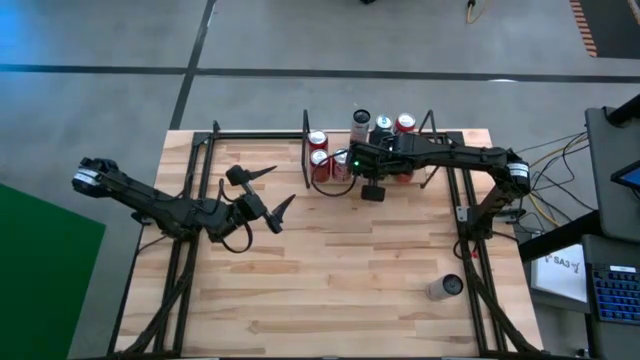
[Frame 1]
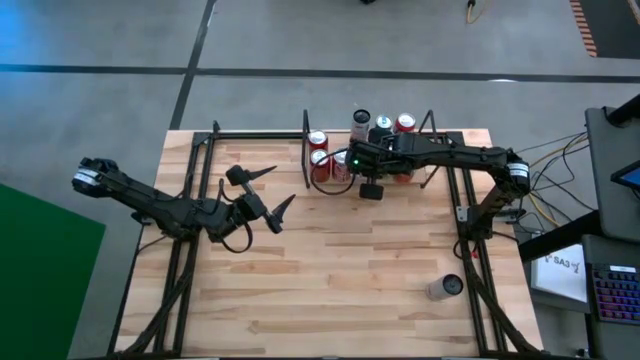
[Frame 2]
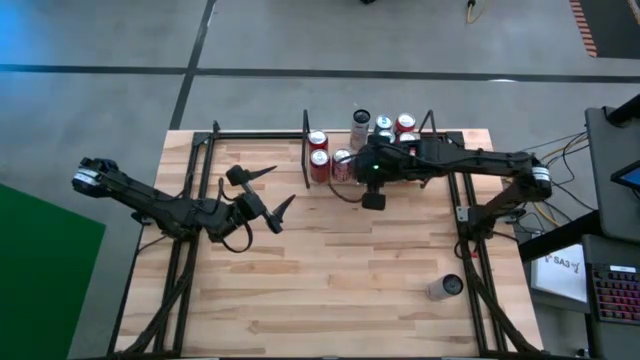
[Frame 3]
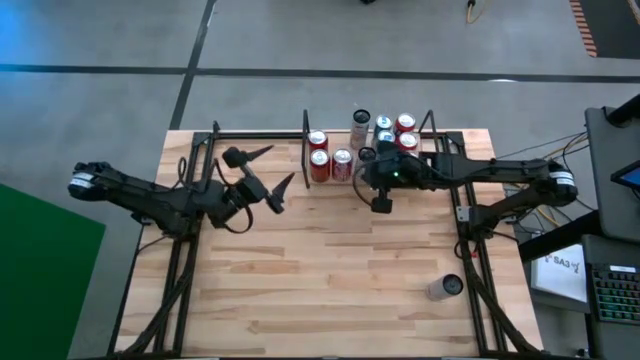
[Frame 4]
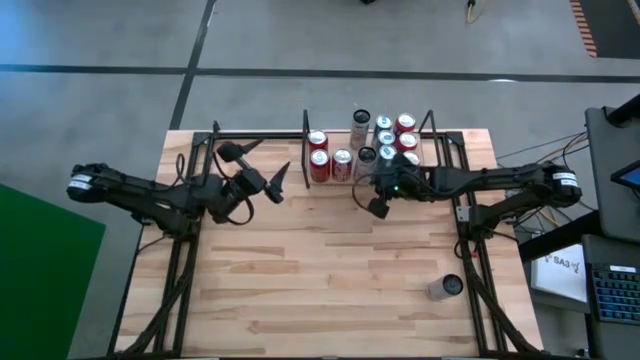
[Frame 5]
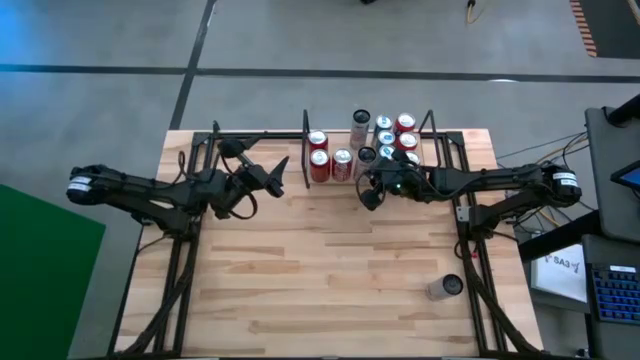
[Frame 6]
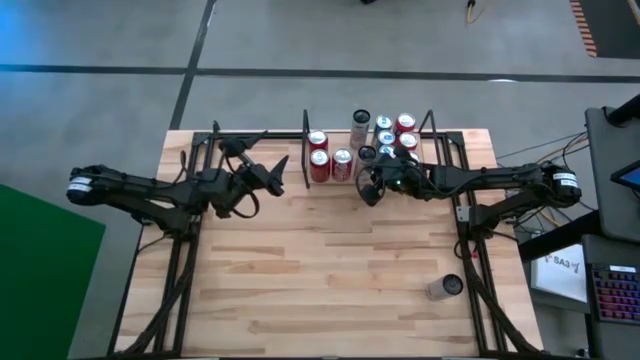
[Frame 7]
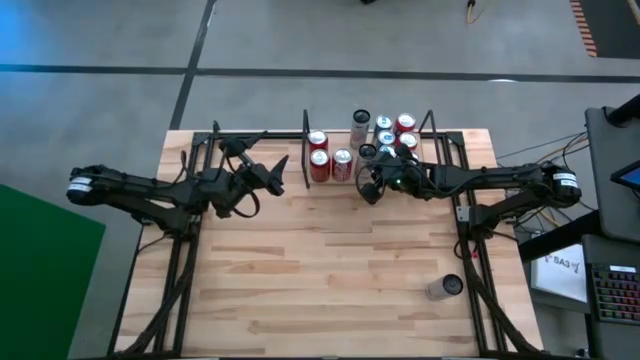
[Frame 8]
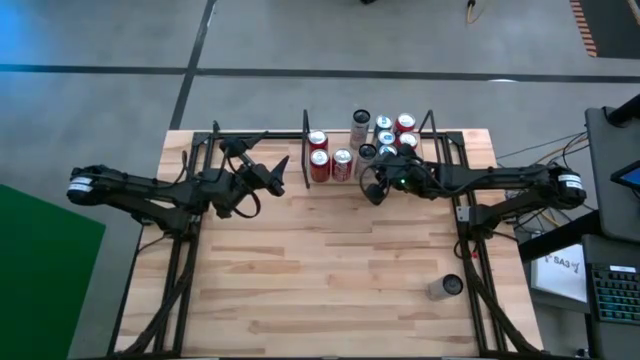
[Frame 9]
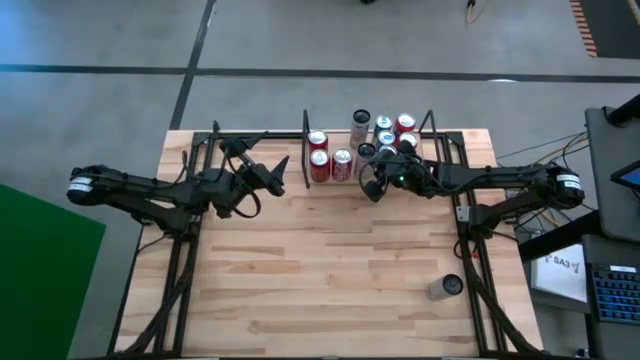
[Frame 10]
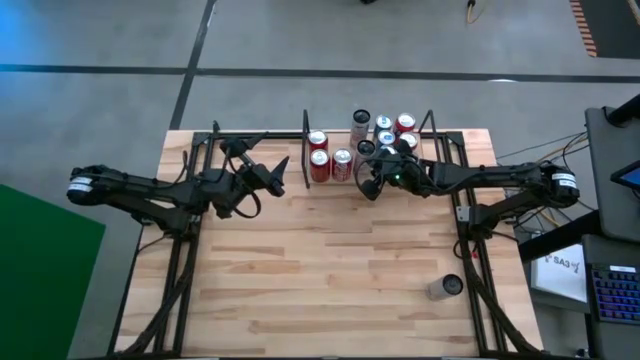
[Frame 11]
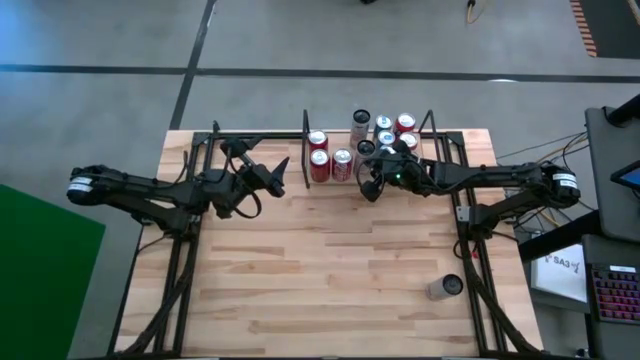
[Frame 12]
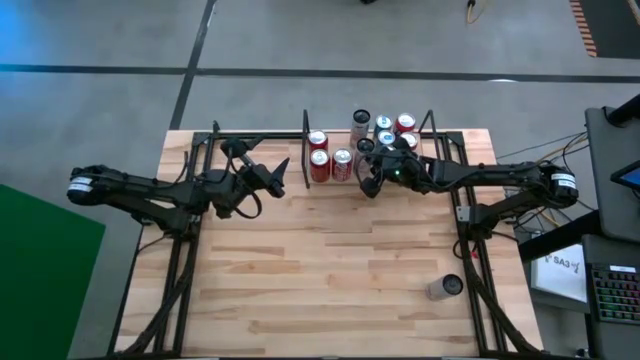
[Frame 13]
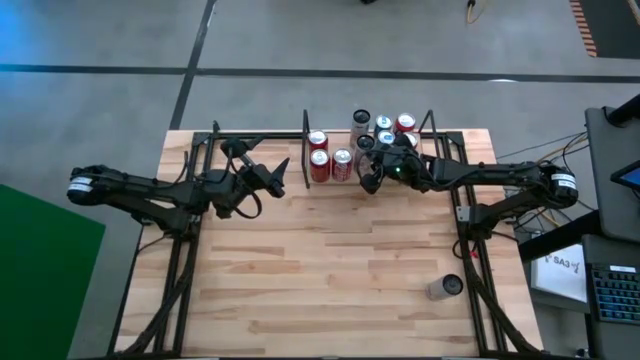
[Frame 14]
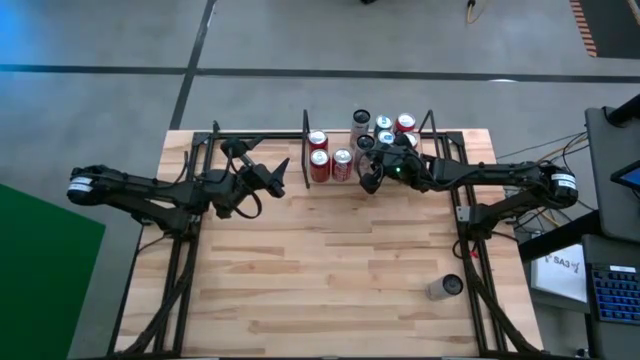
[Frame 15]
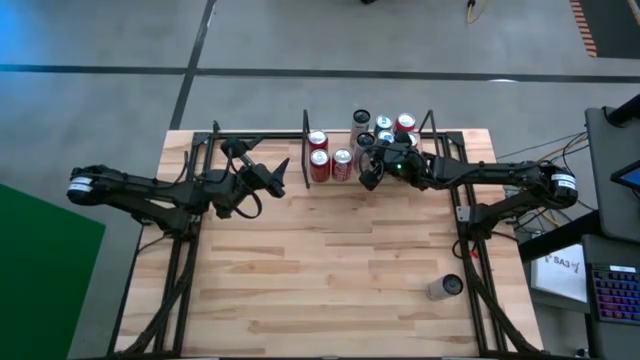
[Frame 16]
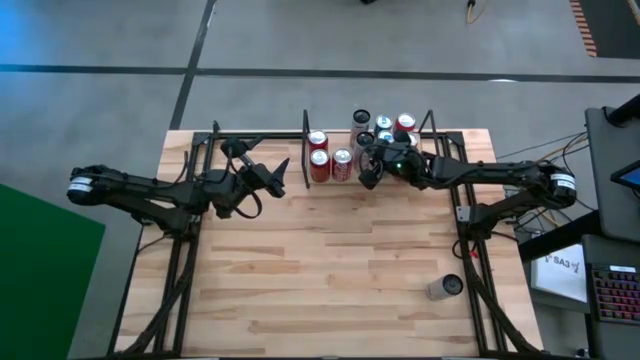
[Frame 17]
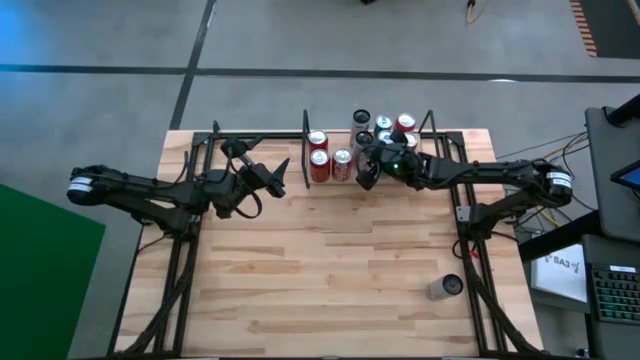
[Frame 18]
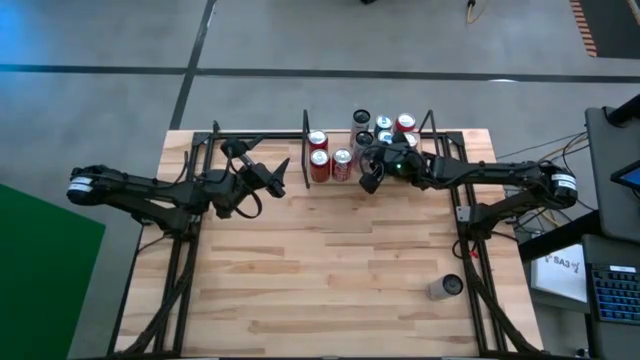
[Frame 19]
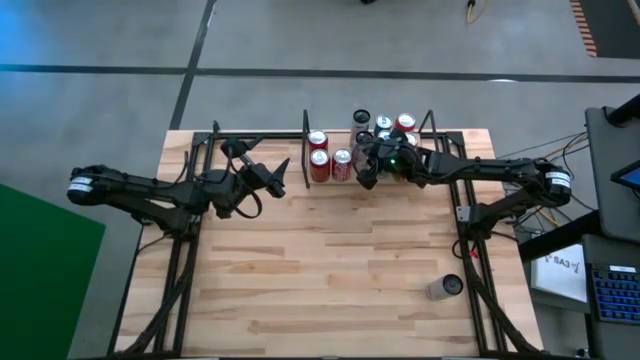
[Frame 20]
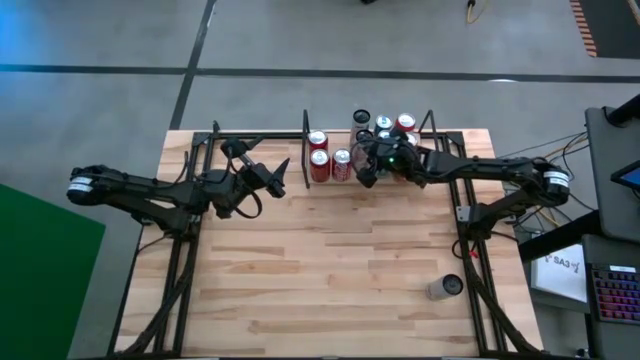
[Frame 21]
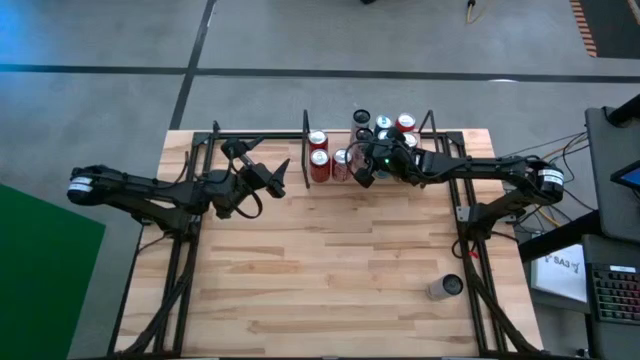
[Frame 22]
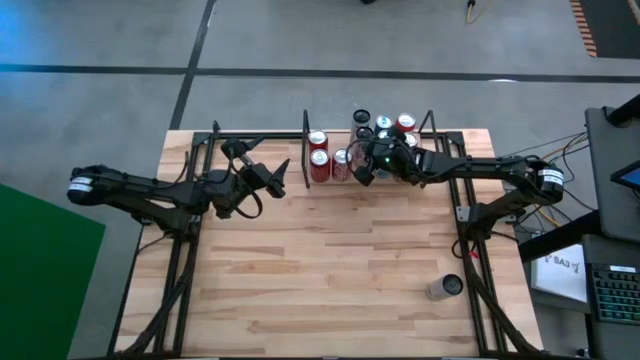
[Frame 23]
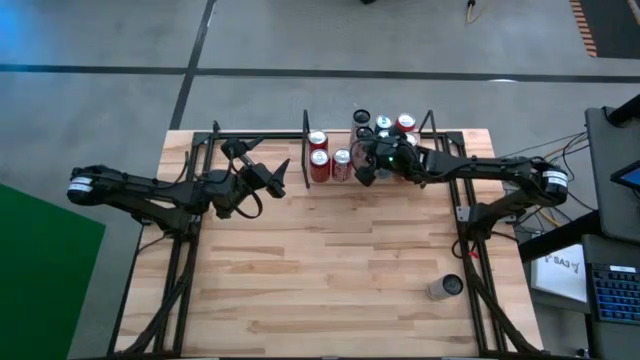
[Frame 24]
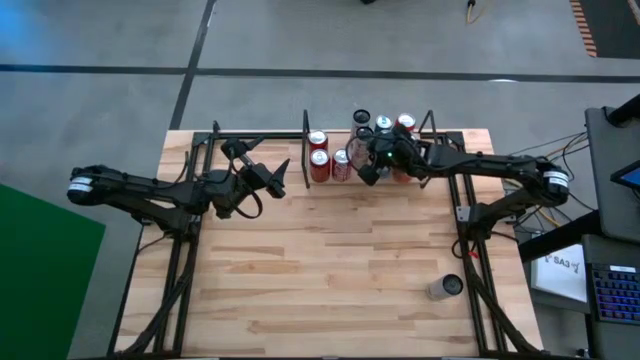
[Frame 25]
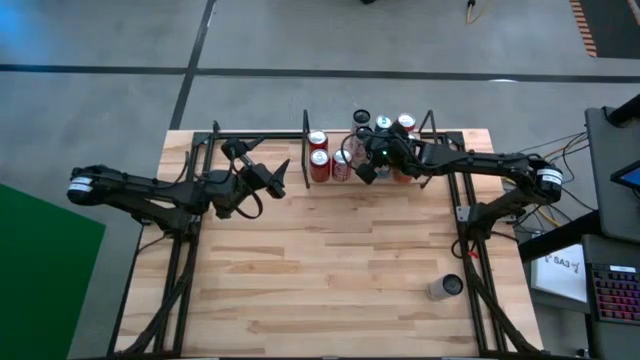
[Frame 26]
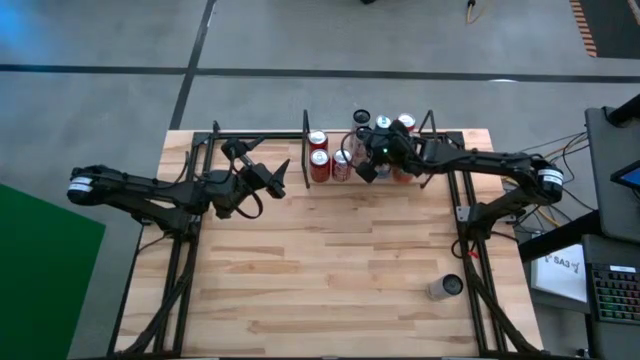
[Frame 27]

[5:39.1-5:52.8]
Task: Place canned beverage on shelf
Put the left white and pink soda can on the shelf

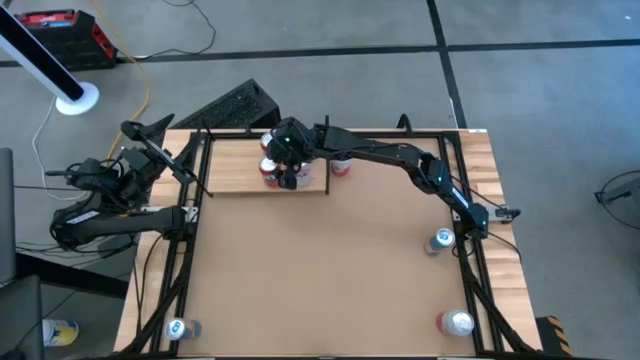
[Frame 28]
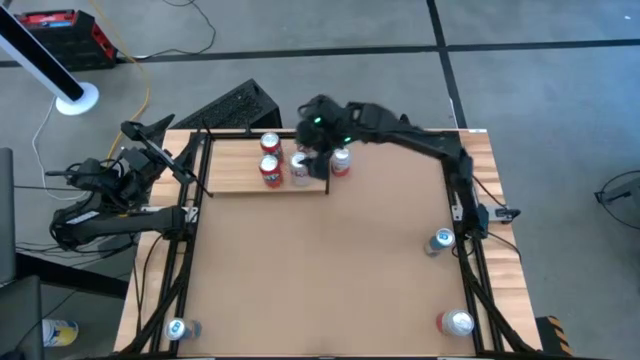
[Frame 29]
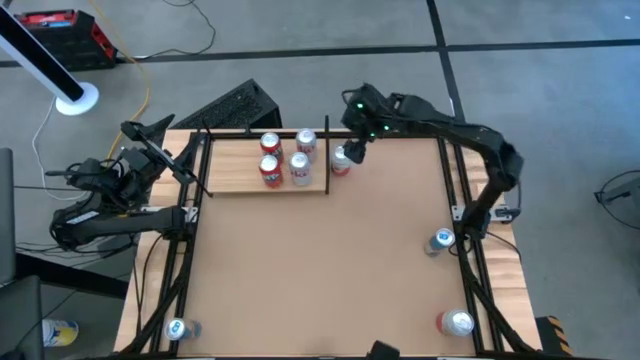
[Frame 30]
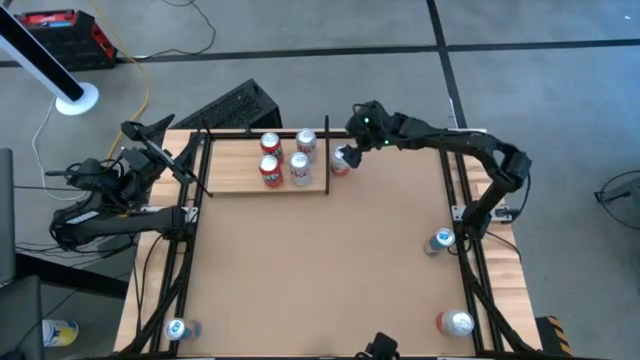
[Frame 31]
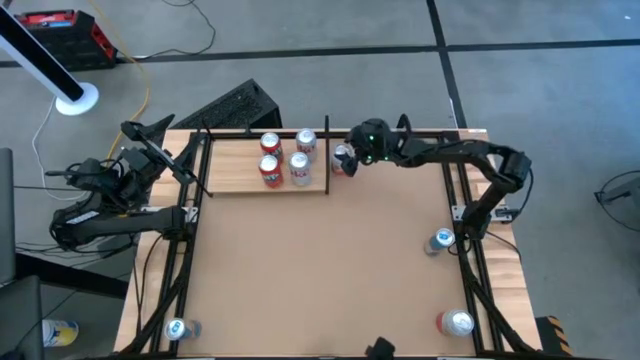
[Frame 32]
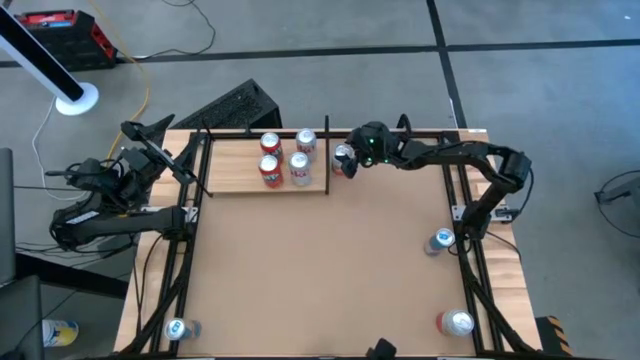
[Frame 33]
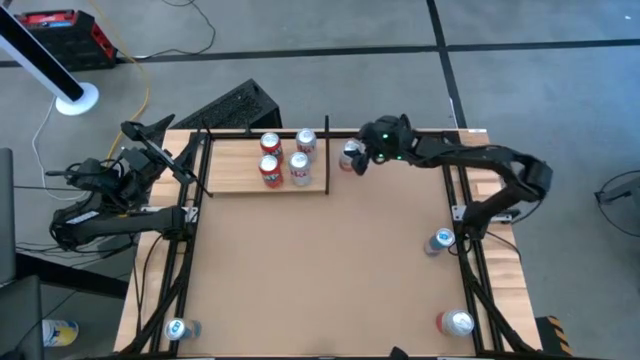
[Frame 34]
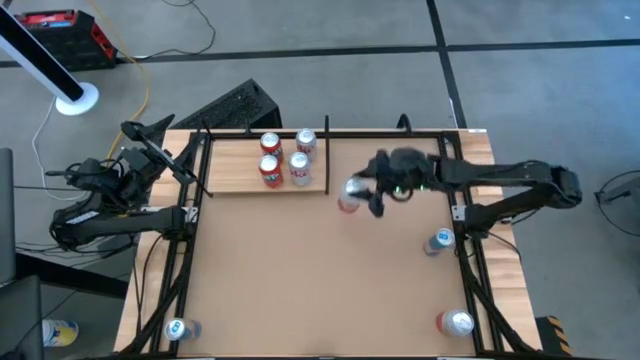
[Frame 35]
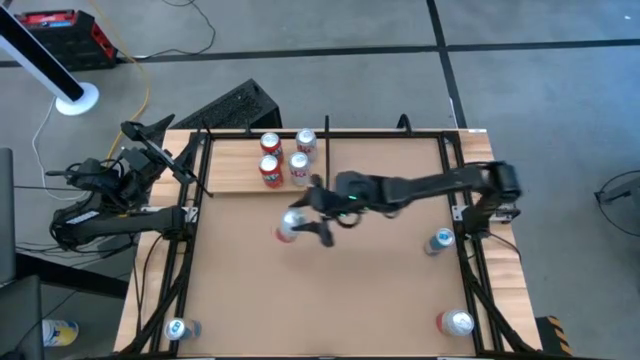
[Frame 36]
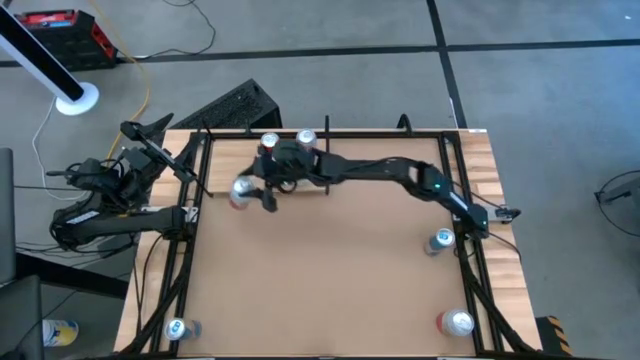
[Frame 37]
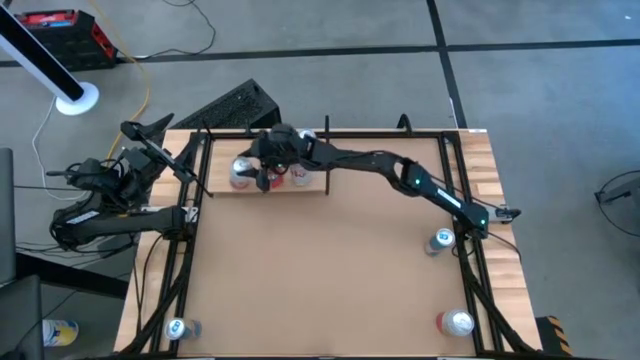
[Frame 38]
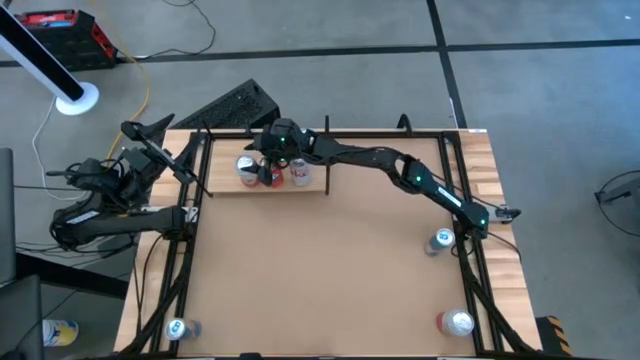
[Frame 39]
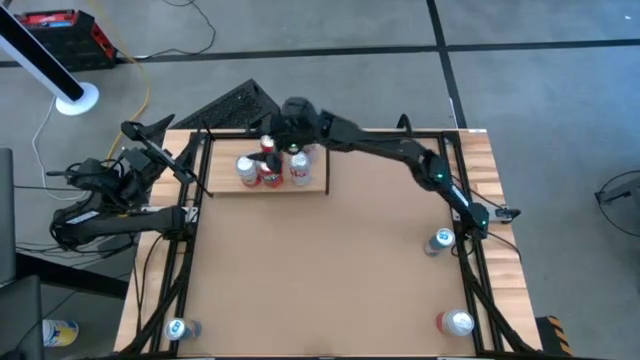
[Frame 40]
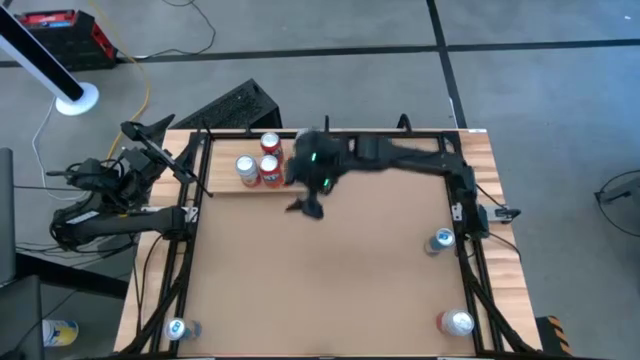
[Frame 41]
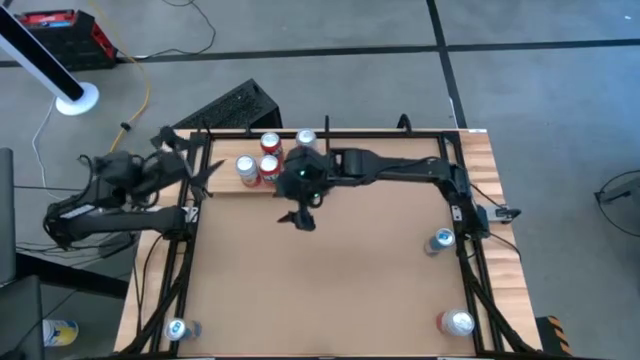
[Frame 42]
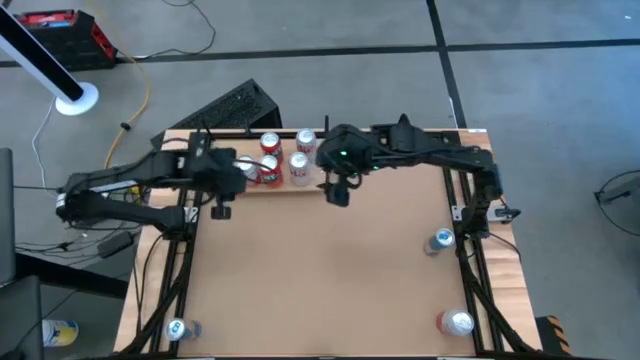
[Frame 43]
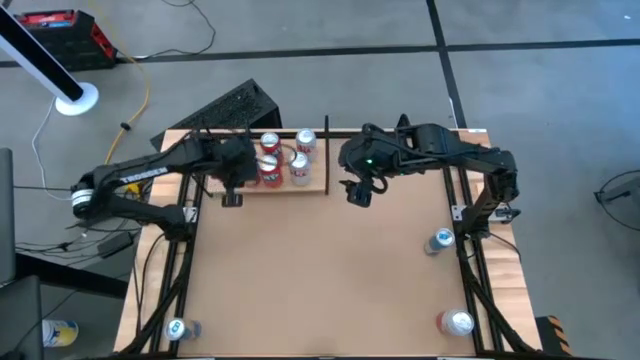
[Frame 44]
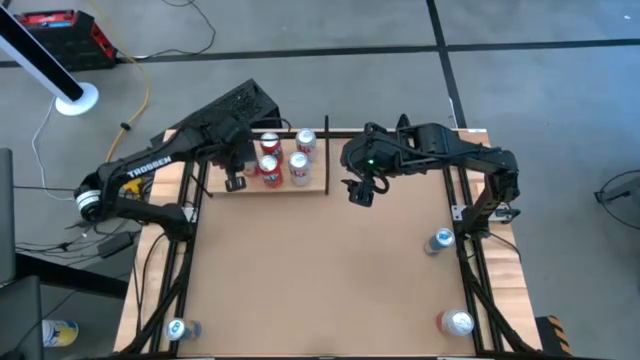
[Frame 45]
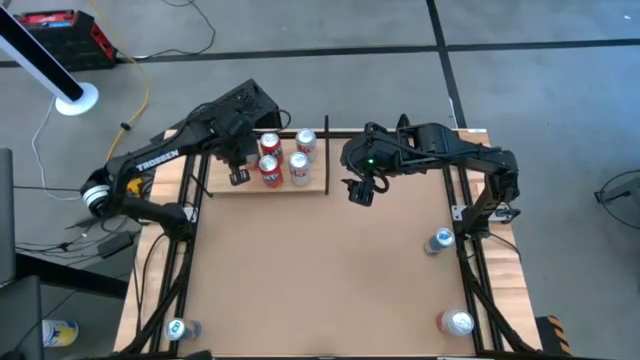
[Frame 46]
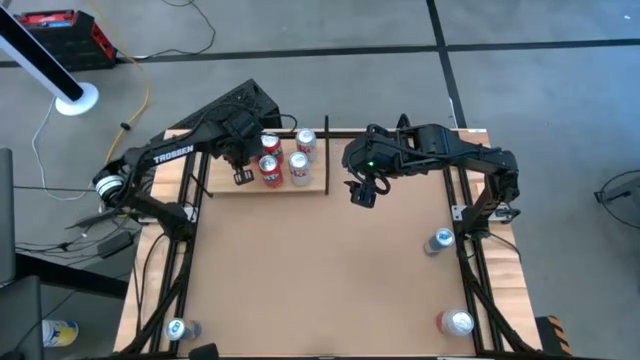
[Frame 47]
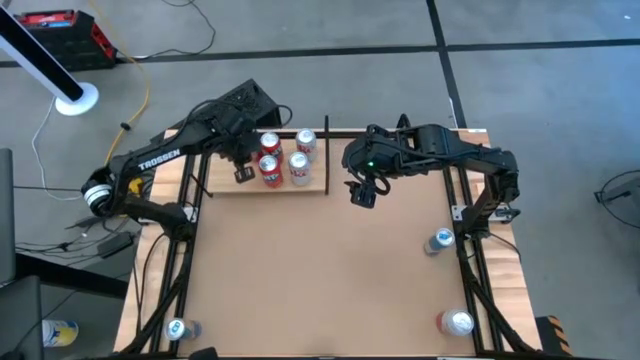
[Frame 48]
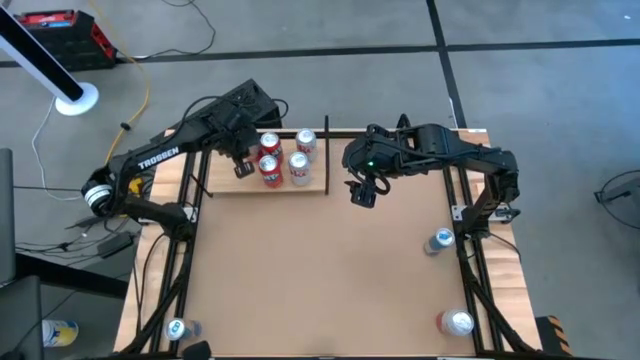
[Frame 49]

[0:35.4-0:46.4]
Task: Place canned beverage on shelf
Put the top pink-white soda can on the shelf
